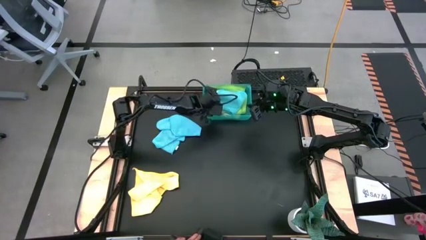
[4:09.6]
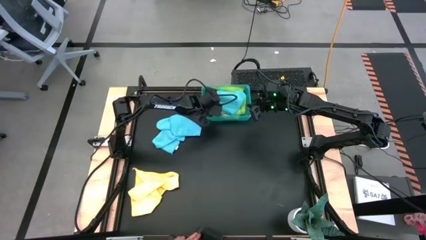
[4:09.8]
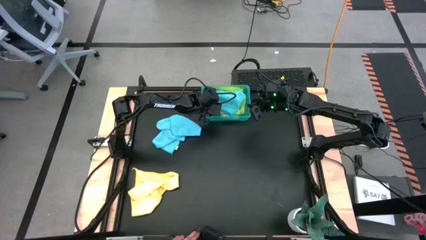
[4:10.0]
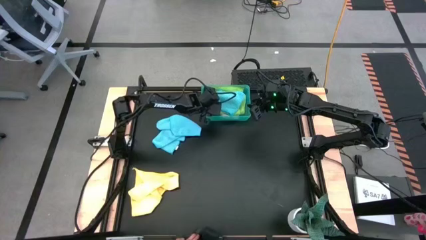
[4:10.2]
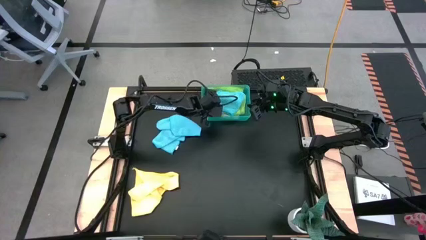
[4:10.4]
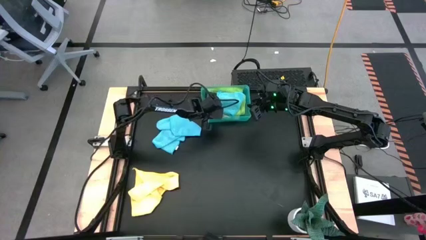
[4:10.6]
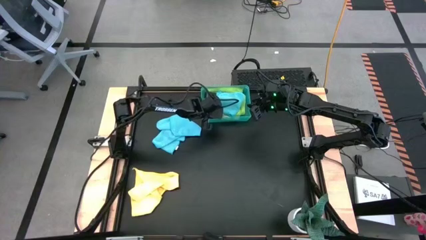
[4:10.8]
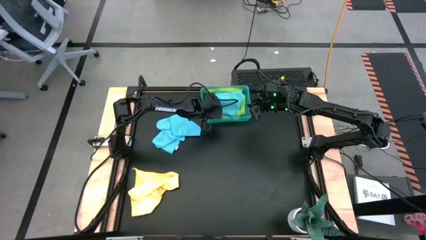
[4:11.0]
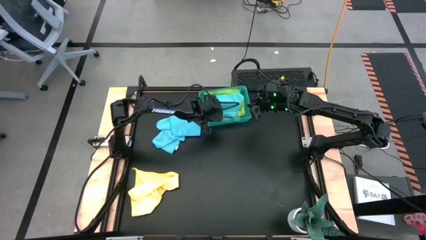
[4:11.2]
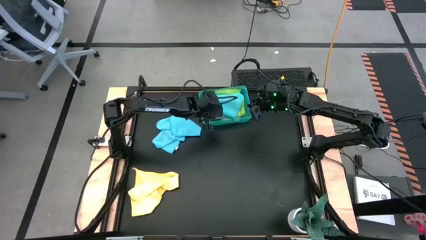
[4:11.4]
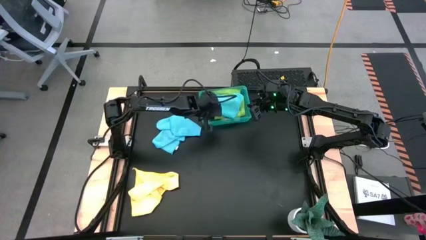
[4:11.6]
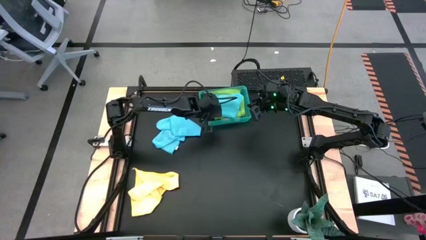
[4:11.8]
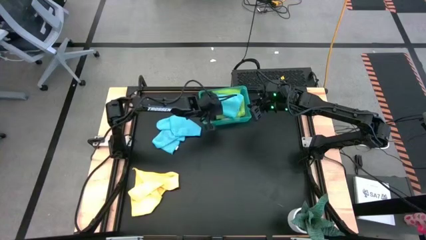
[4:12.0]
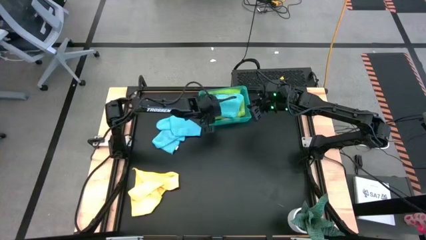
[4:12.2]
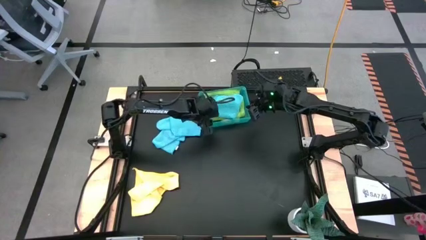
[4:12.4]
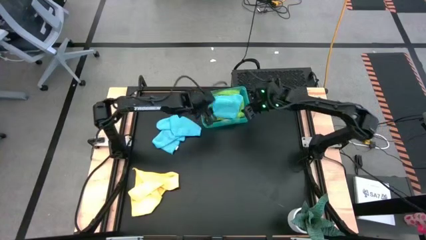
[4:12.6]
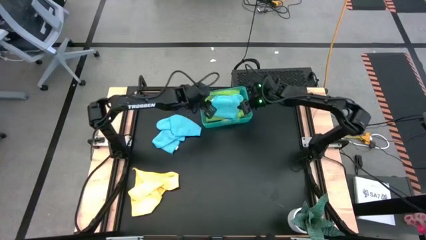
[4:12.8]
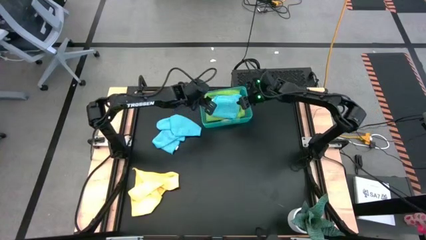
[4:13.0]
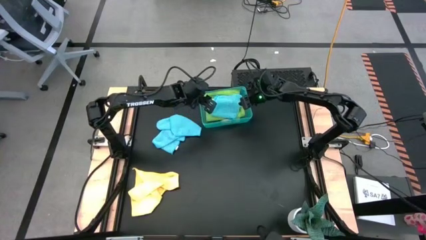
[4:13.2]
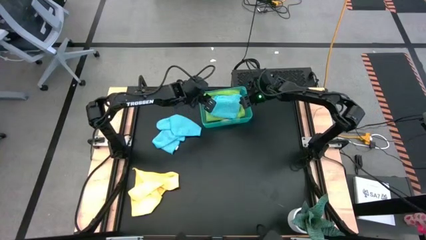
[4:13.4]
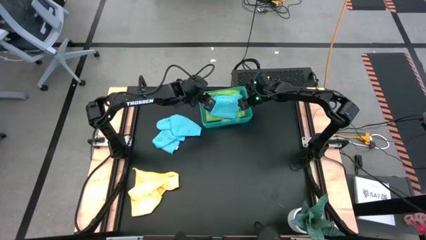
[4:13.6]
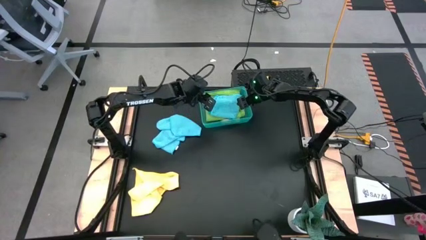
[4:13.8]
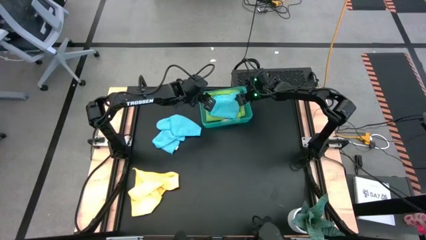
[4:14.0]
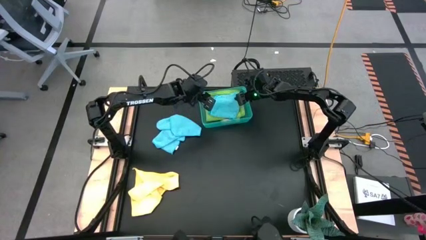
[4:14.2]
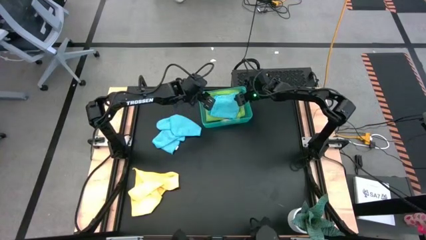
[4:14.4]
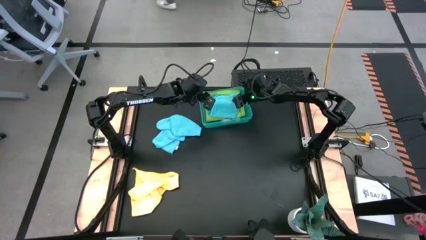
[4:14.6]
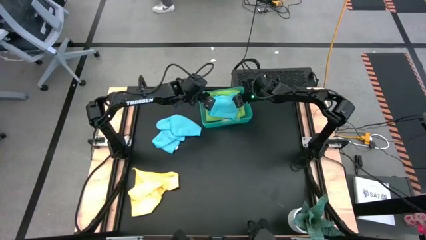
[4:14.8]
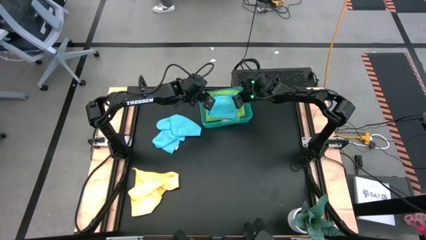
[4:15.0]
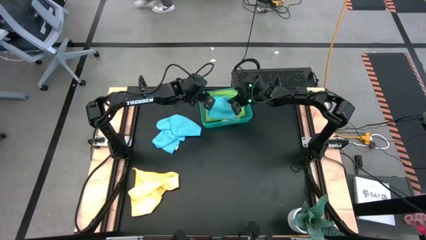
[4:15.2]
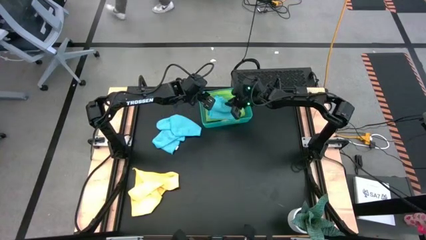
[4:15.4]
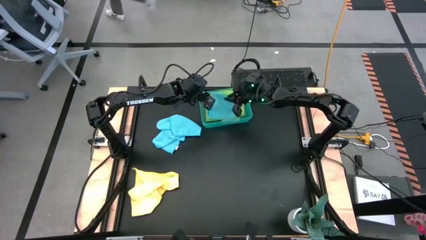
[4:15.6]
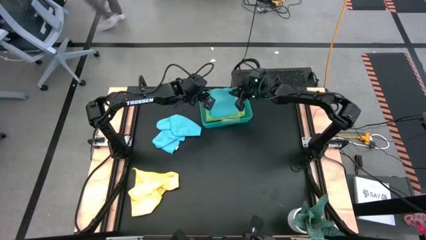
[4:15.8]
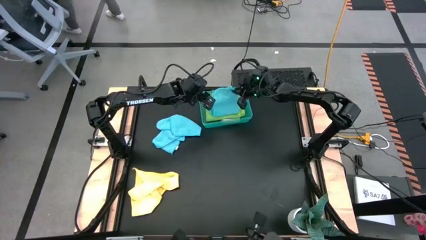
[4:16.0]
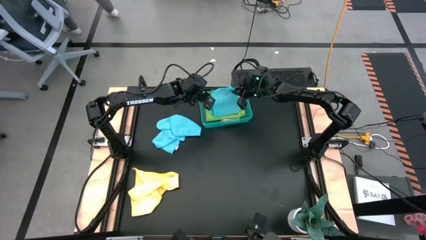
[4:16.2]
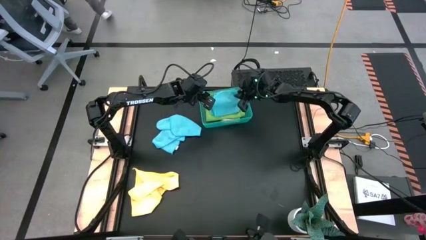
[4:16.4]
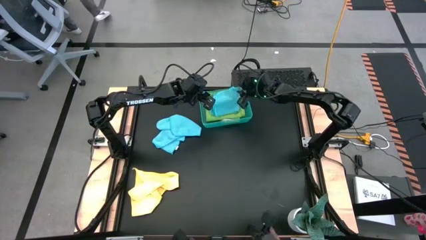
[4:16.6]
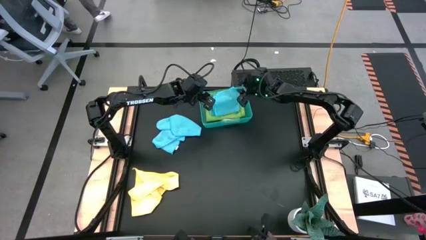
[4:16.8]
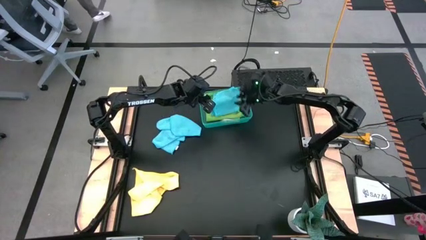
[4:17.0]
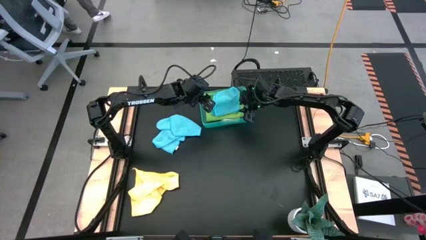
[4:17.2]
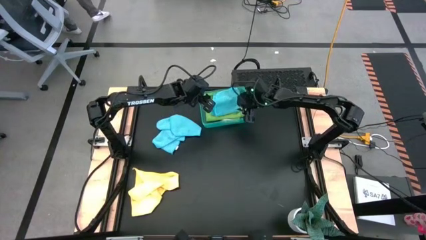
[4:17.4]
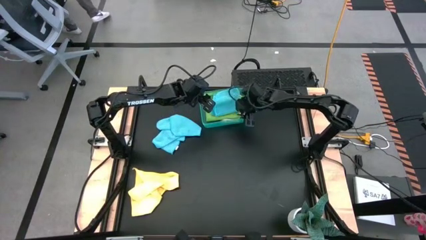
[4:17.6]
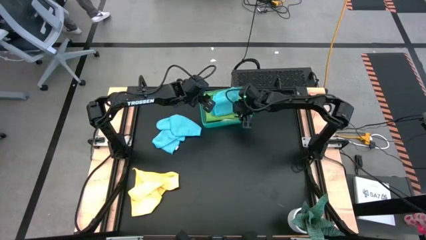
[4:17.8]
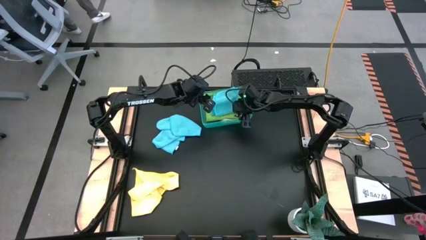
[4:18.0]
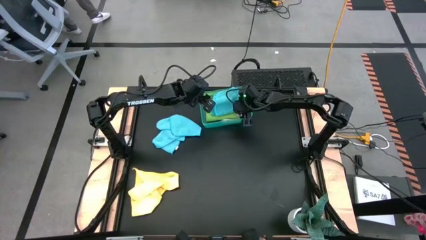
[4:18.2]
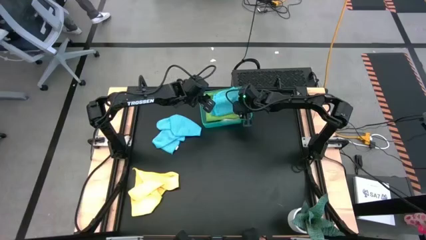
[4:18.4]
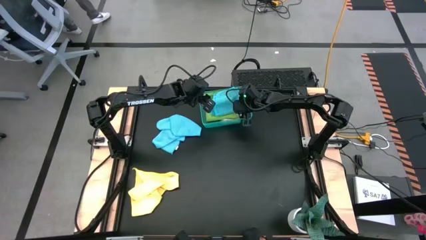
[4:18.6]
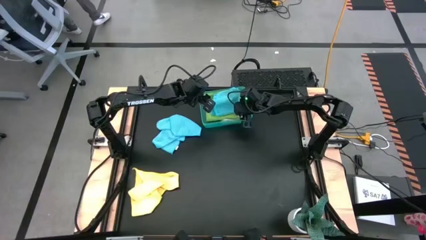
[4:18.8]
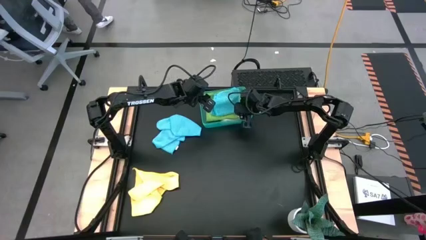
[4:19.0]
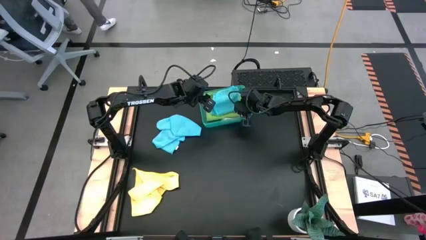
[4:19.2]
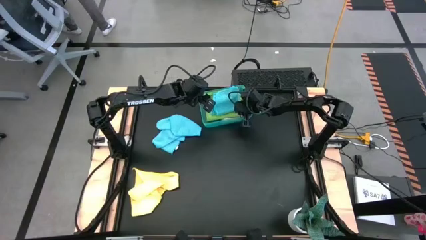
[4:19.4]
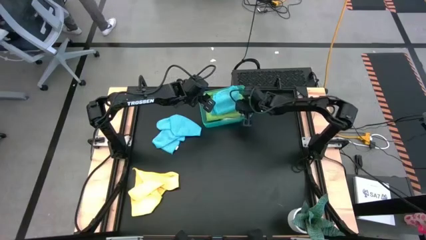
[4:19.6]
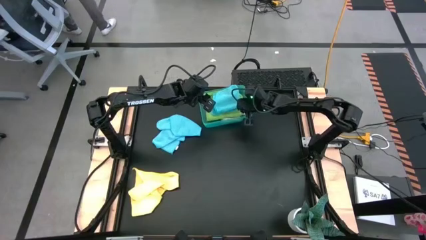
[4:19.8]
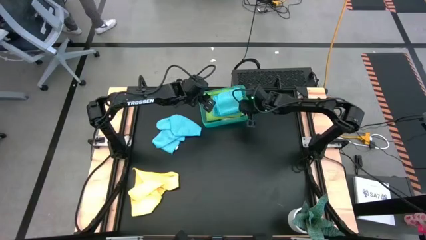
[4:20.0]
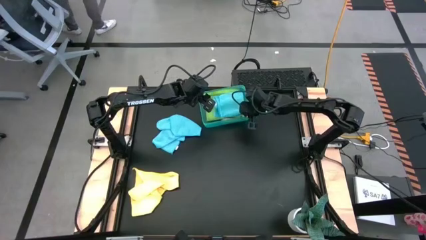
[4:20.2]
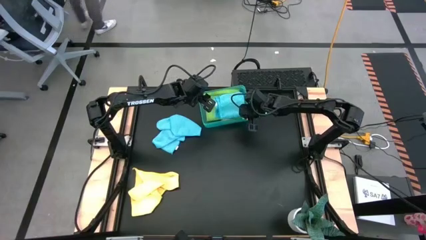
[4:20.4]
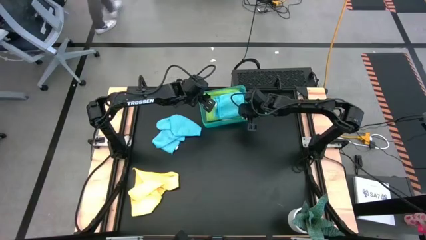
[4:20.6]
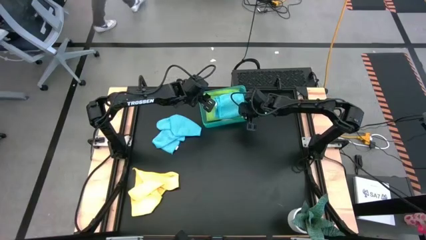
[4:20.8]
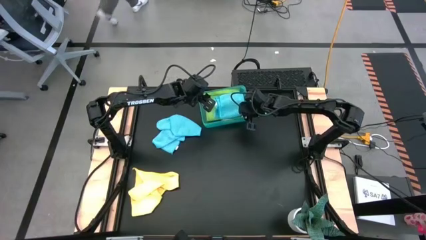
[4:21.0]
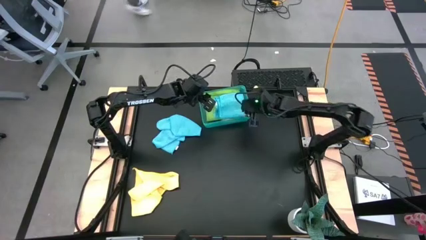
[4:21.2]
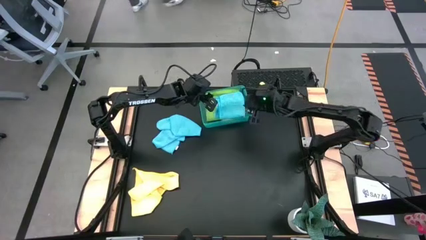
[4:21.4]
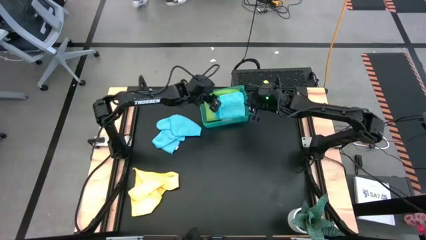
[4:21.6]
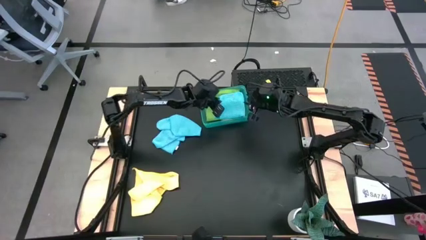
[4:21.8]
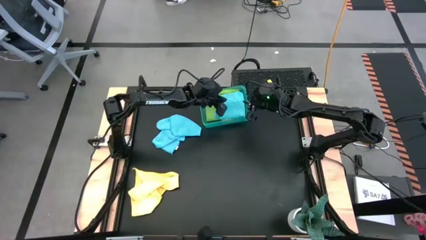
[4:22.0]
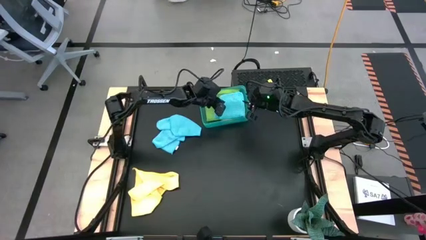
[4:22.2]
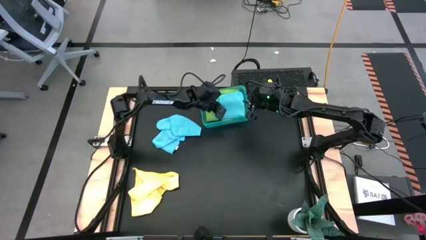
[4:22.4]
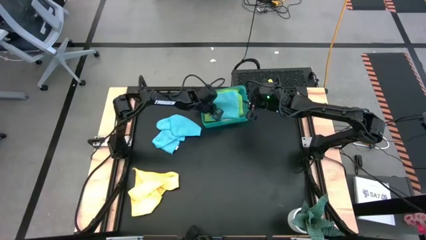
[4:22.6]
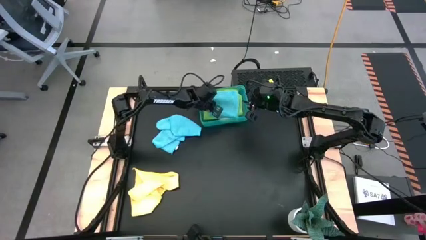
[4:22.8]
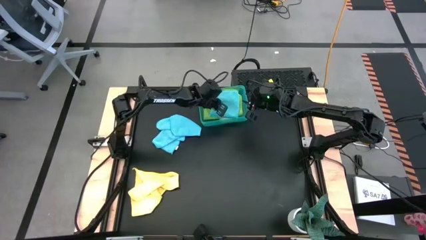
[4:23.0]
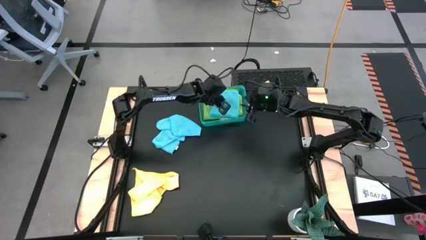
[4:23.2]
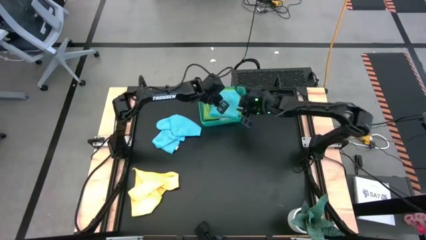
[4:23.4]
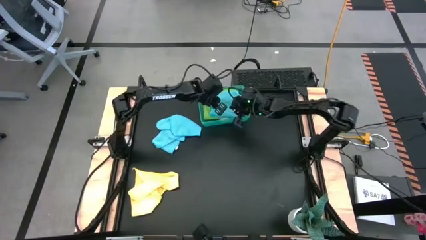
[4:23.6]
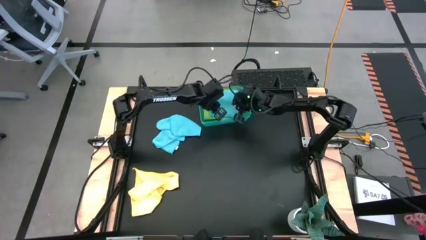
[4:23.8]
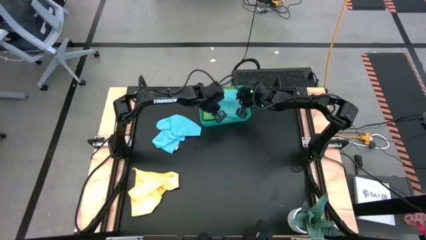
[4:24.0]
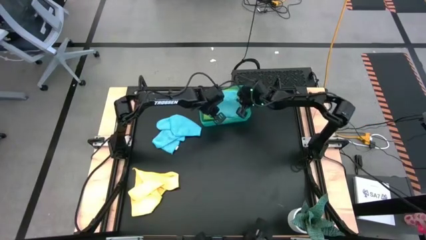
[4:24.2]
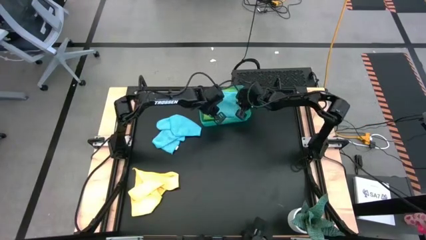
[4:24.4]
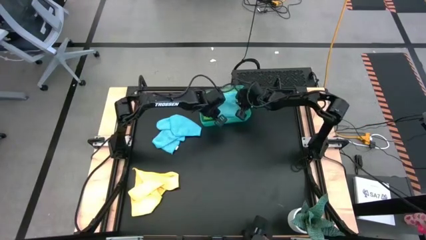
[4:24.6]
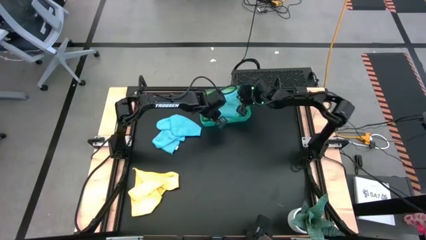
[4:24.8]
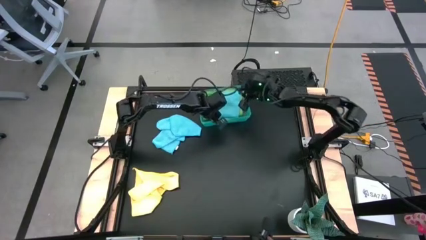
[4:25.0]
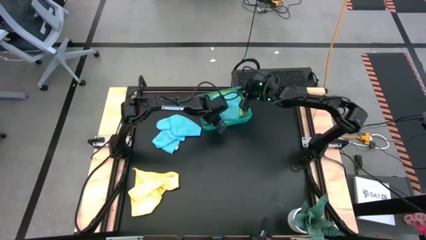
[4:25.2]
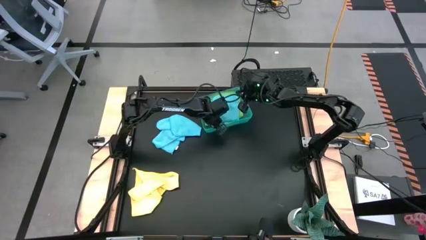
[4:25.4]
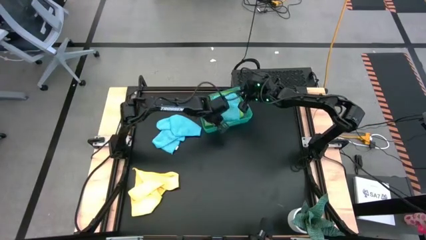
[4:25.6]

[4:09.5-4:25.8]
Task: Fold microfiber towels
Put the blue microfiber towel into the blue bin
